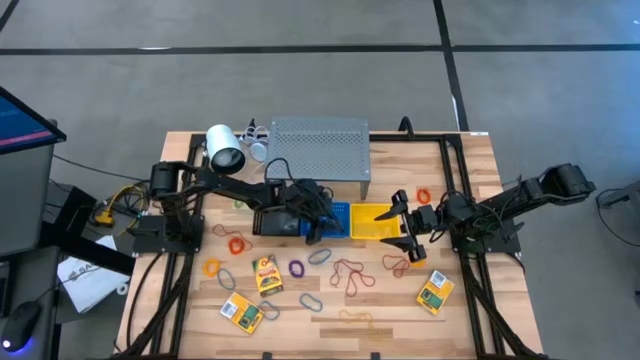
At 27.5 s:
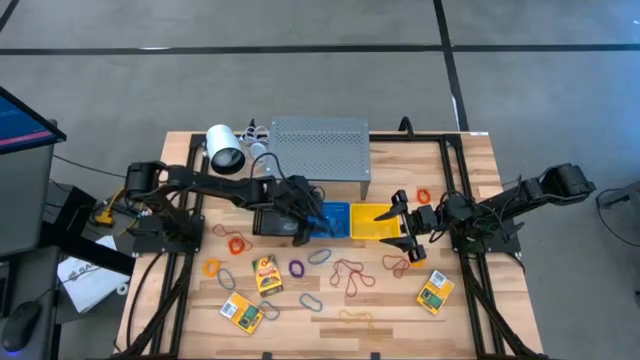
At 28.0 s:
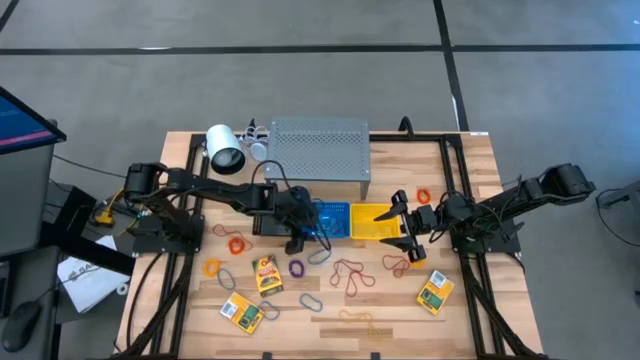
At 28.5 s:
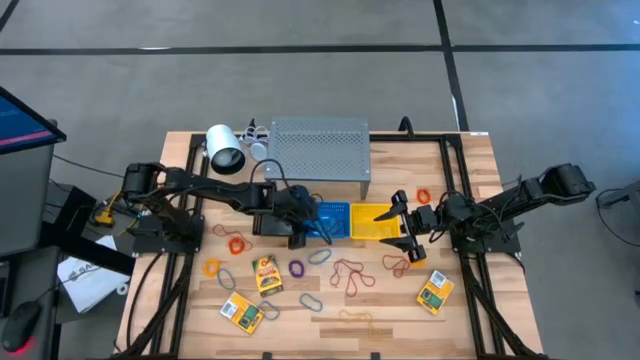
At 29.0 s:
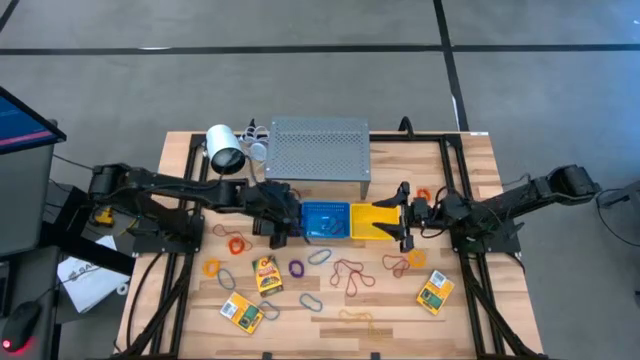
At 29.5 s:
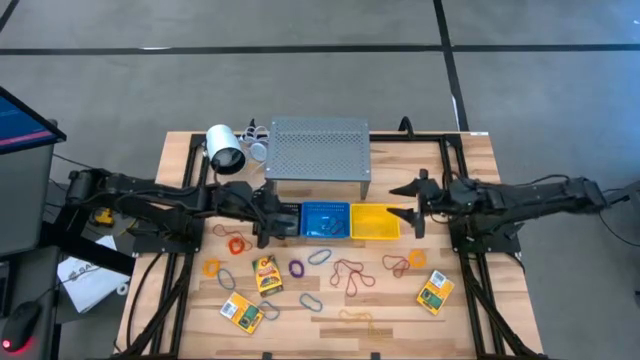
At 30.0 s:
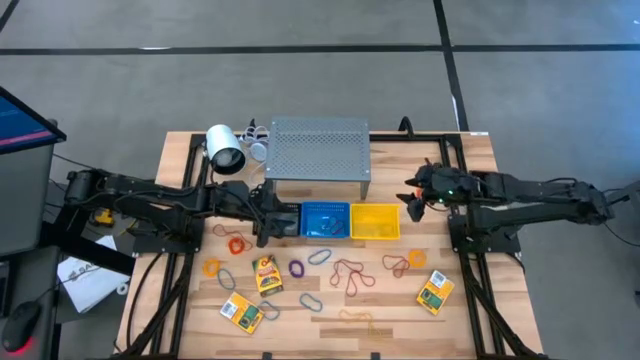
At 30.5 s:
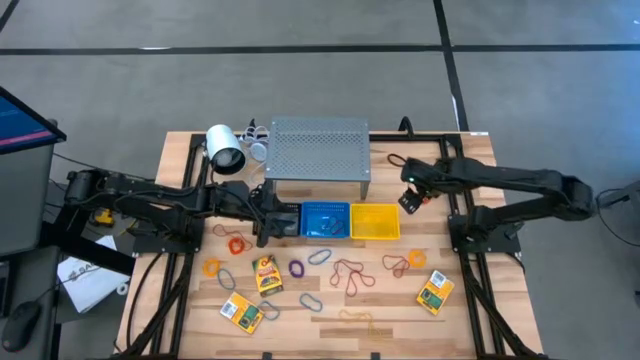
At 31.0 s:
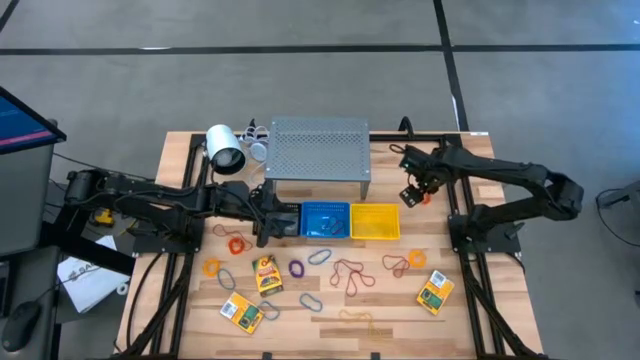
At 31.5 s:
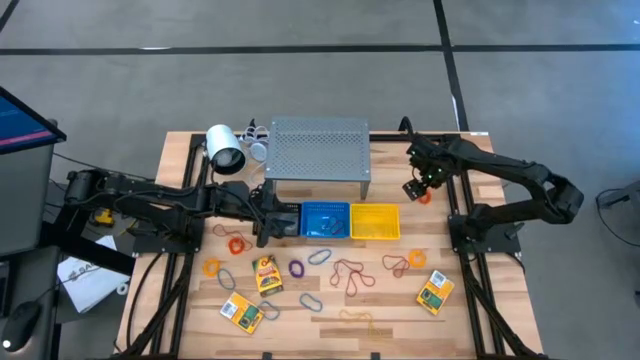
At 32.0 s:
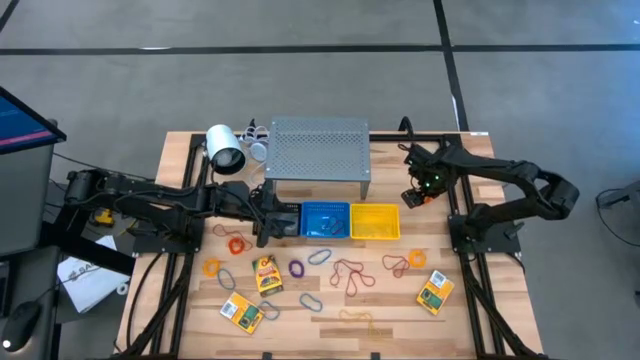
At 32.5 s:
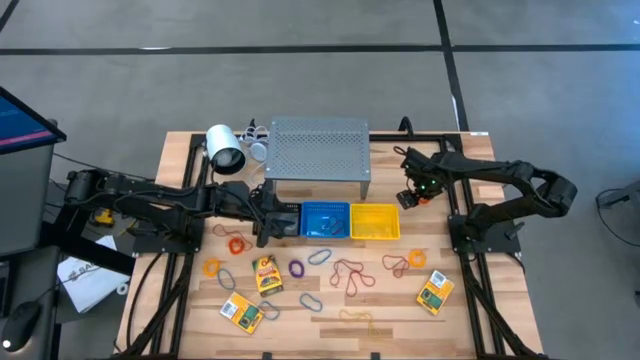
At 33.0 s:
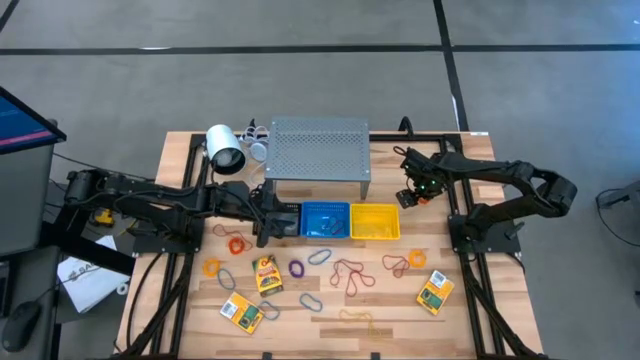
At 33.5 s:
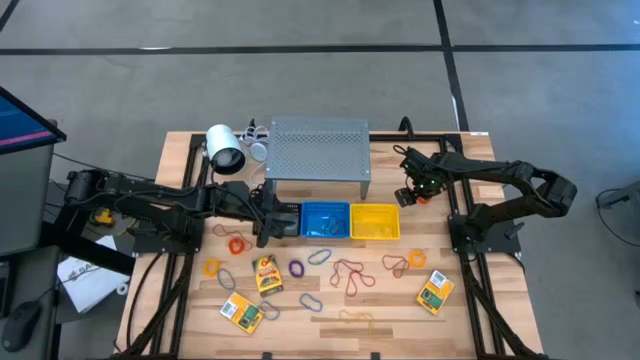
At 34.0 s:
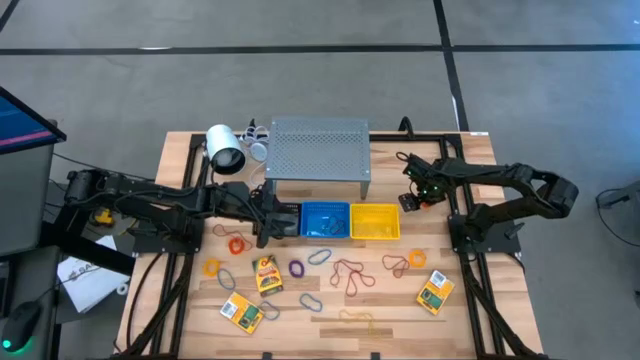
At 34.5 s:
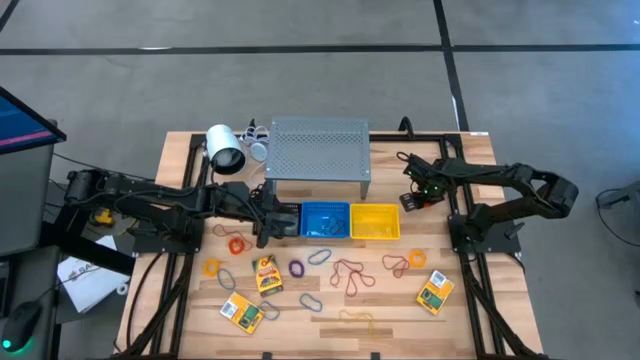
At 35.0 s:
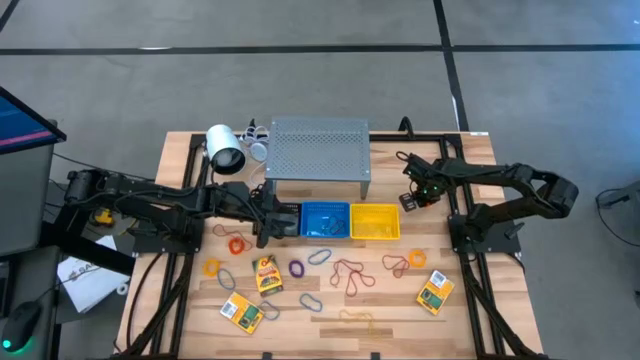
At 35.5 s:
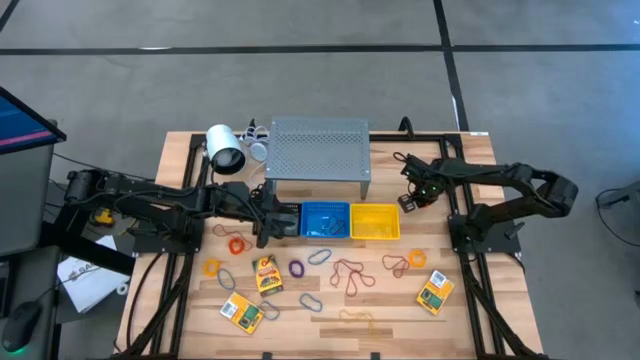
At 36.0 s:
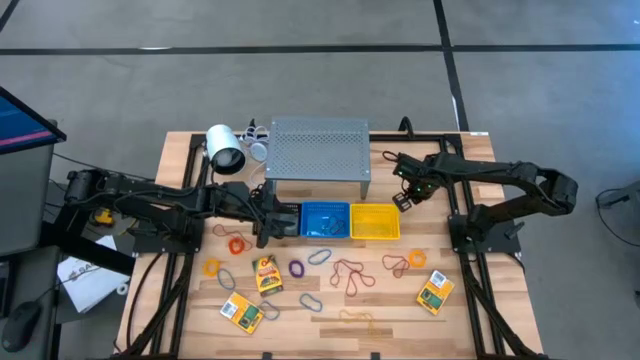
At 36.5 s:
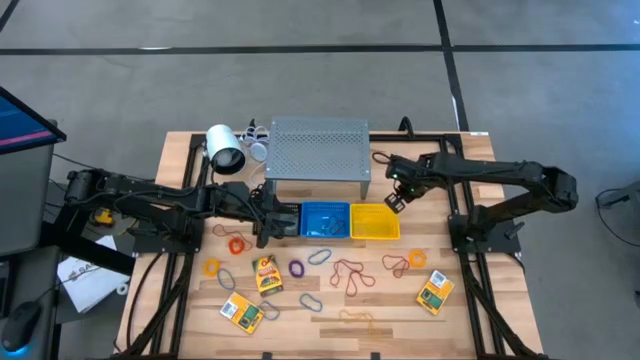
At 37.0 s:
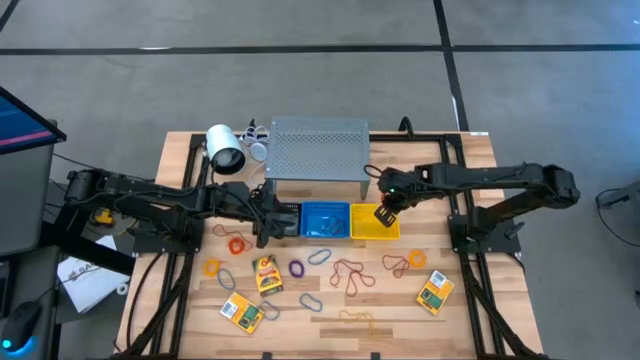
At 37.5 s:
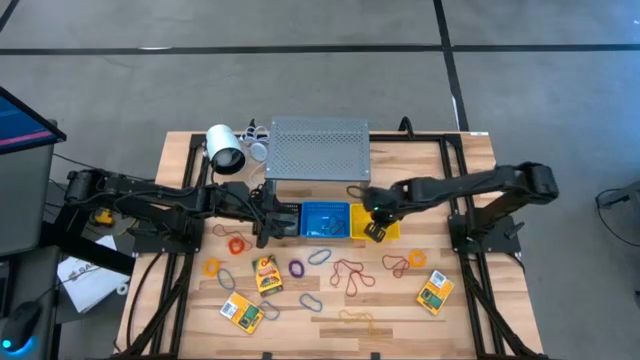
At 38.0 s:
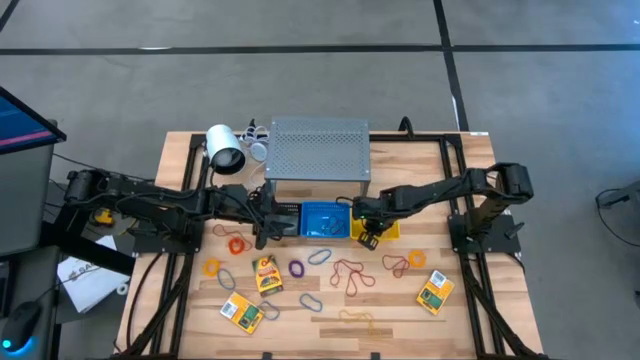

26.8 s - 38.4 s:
Task: Pick & Place Office Desk Supplies
Put the orange spiral keychain into the yellow bin

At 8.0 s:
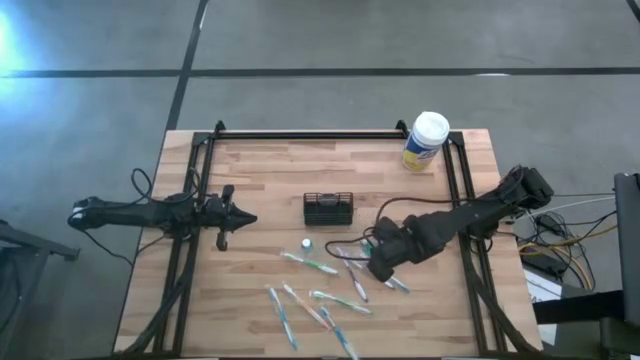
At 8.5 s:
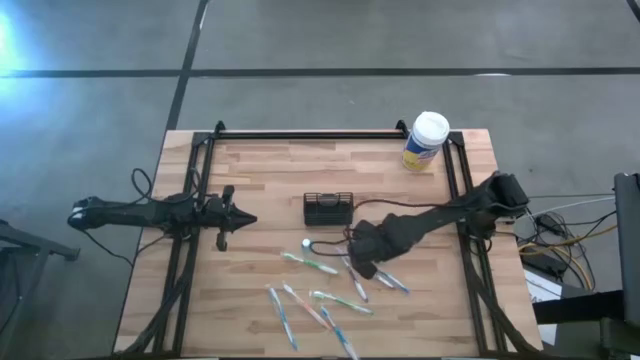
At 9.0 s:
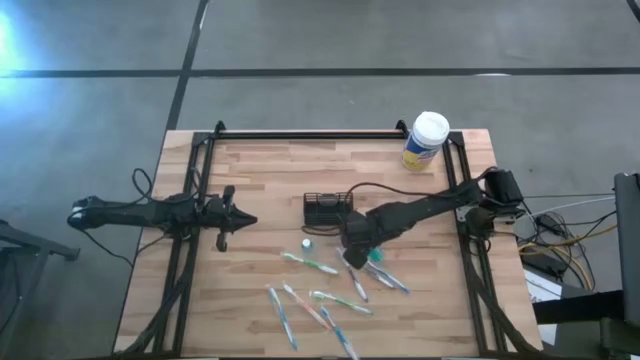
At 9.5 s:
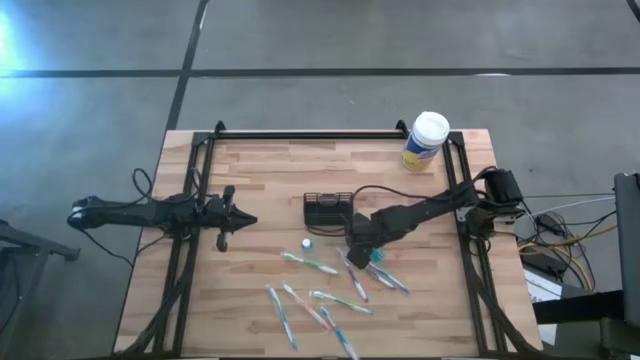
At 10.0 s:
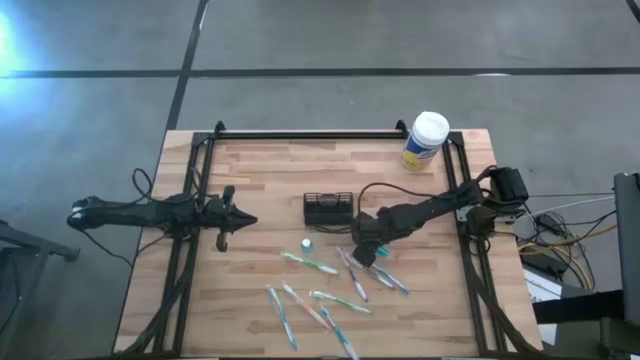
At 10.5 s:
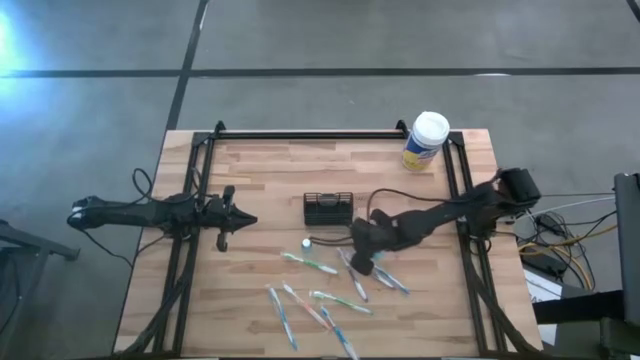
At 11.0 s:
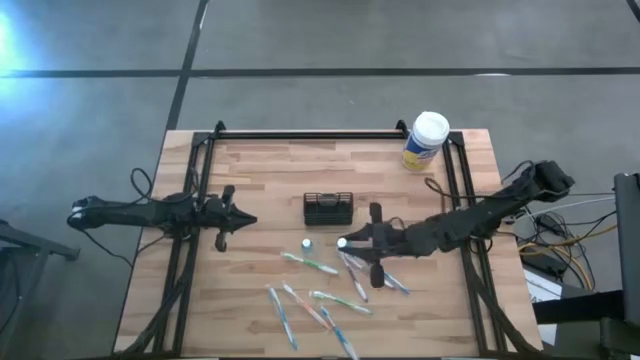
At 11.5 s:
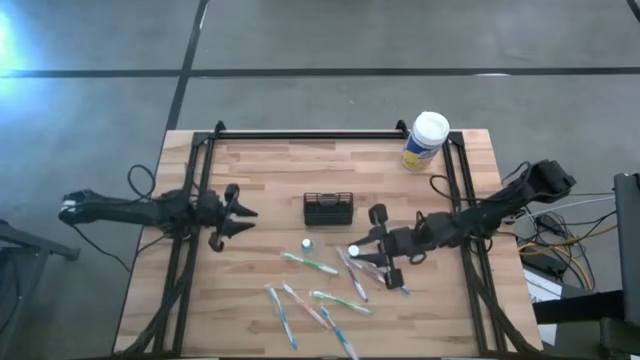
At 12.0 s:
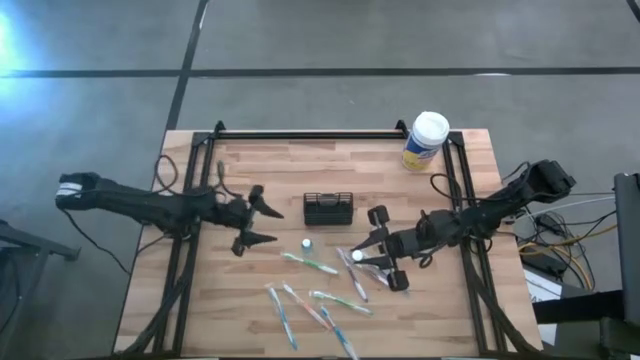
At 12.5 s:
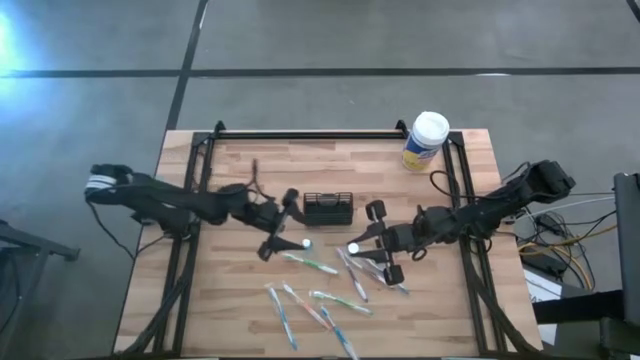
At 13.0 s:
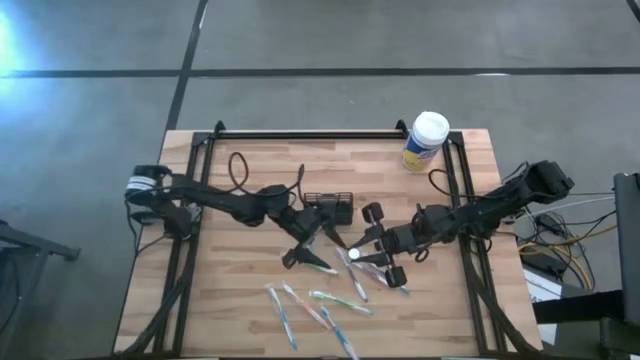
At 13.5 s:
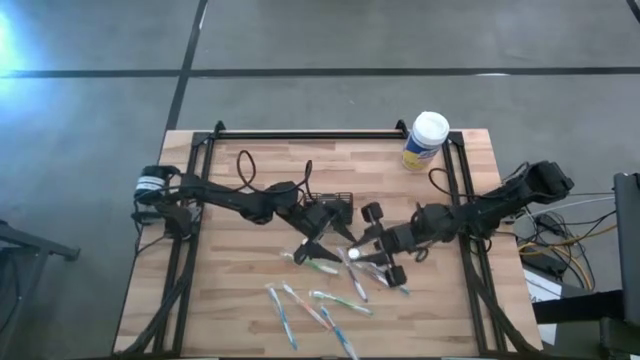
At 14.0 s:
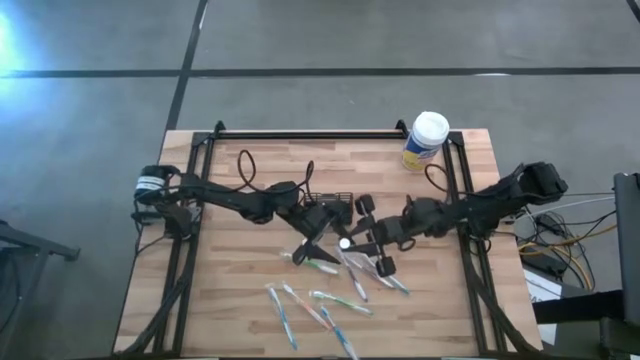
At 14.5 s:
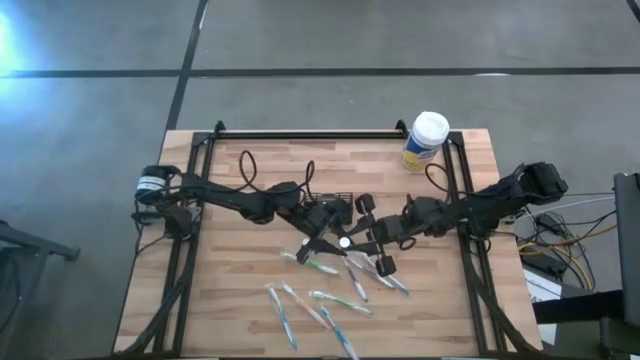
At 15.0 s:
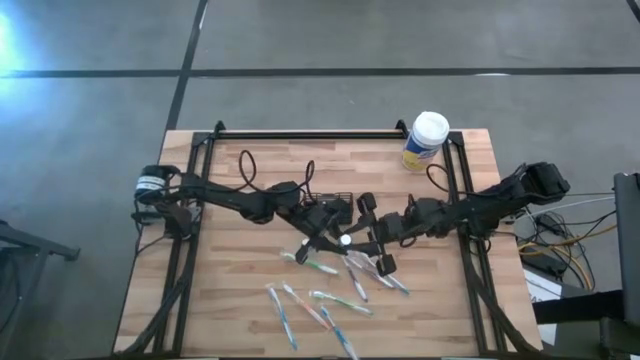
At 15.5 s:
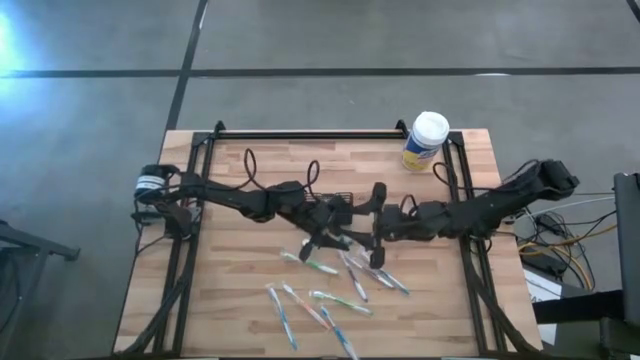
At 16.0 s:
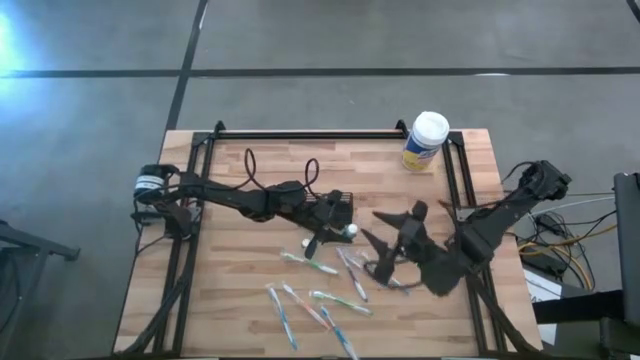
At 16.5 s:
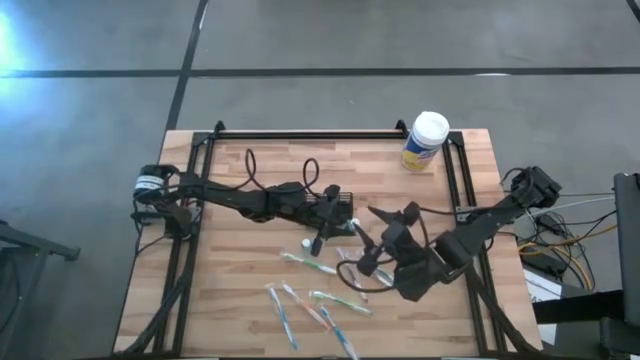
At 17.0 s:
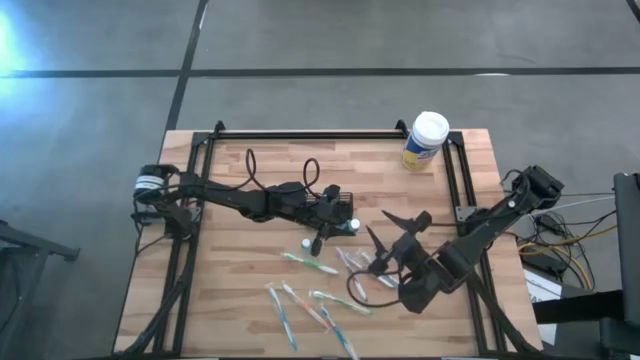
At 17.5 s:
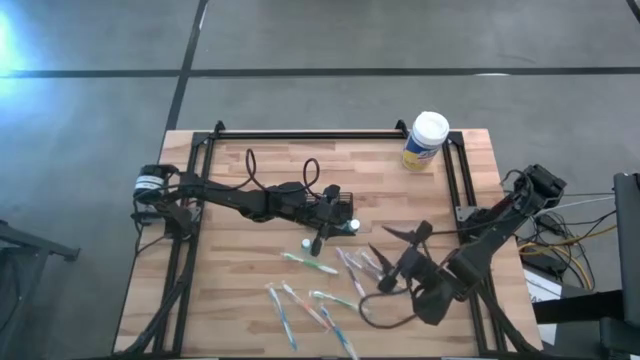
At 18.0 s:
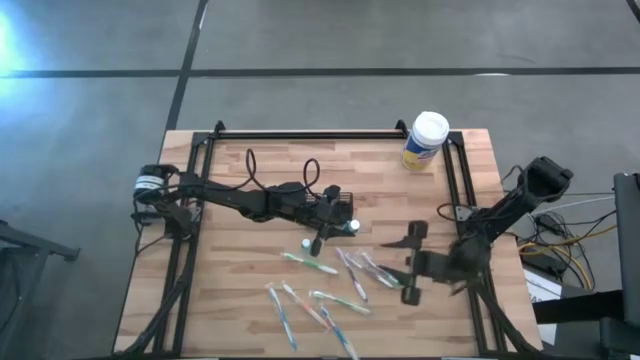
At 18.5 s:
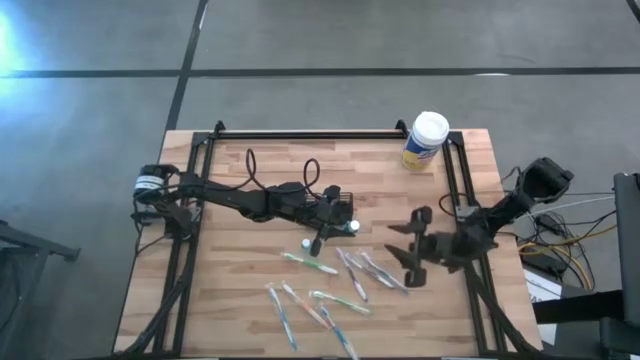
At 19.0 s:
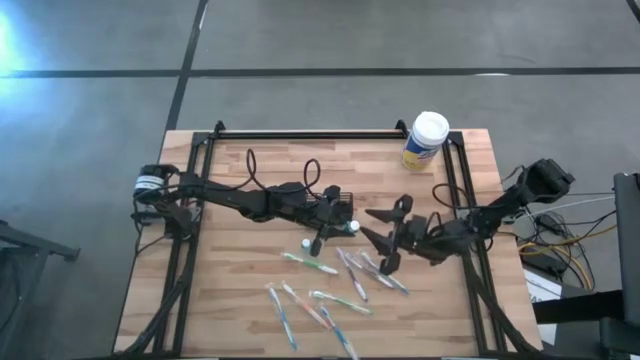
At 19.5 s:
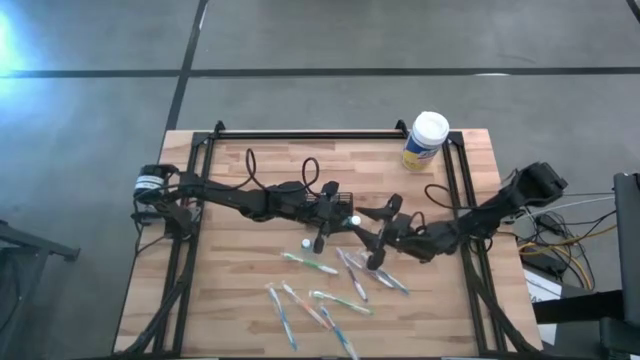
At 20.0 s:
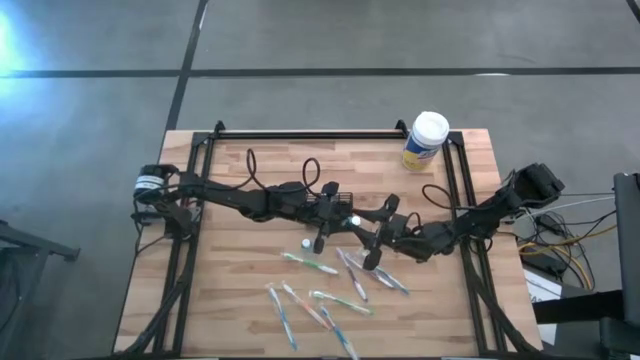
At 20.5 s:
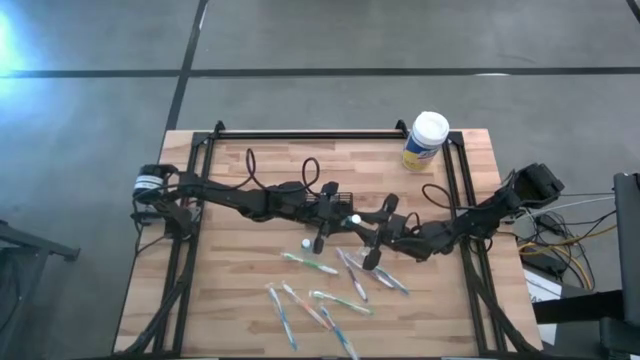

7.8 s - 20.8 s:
Task: Pick & Place toothbrushing station
Put the right blue mouthwash bottle into the black organizer
